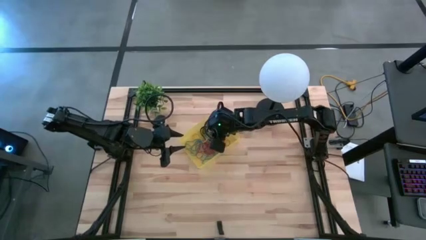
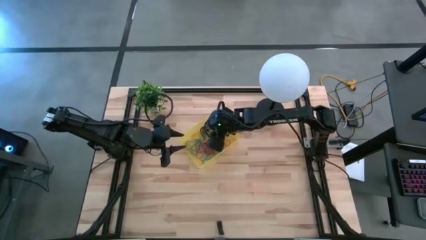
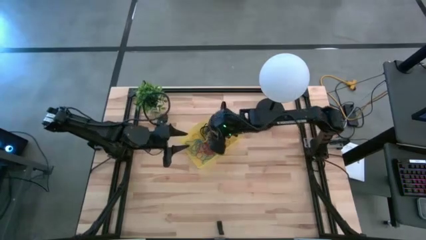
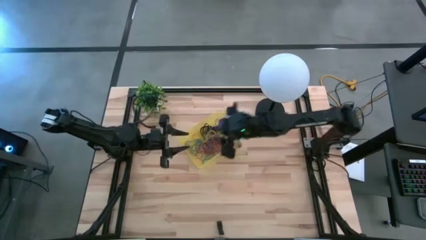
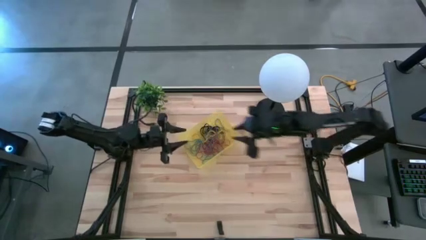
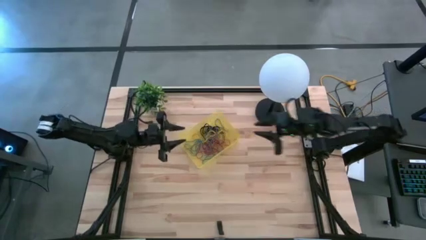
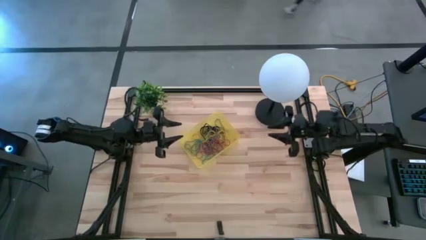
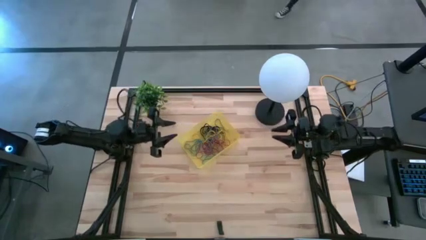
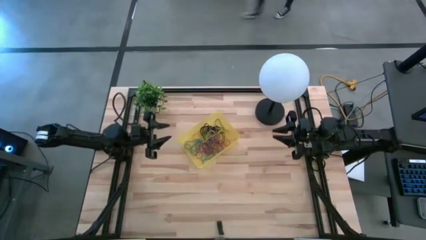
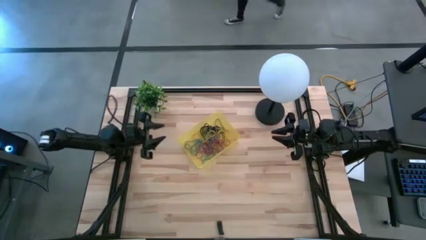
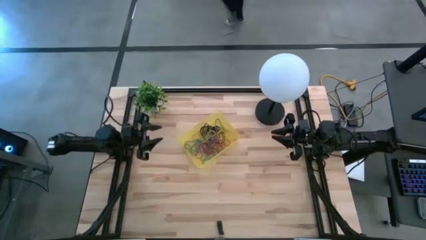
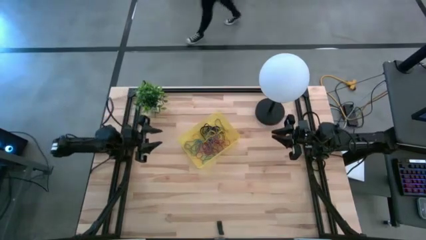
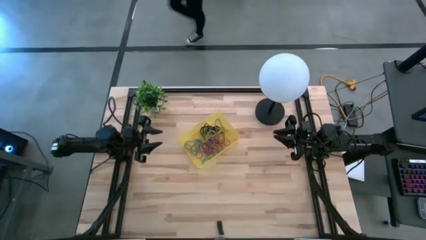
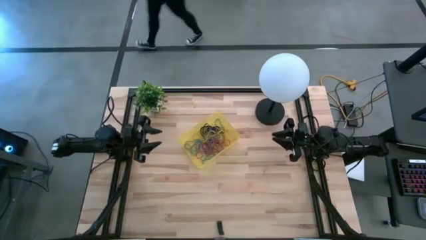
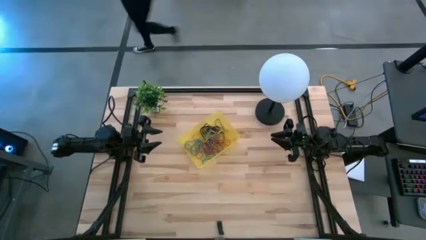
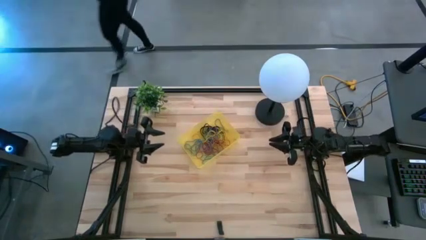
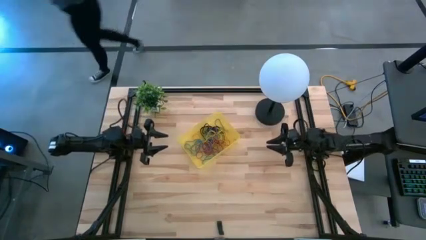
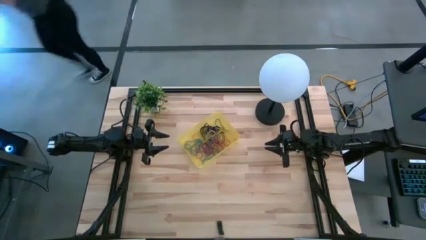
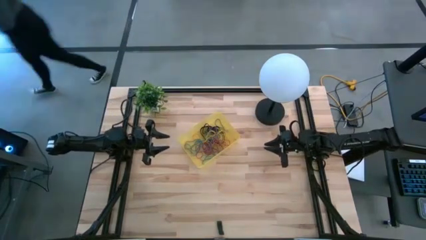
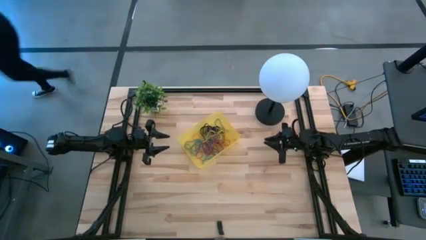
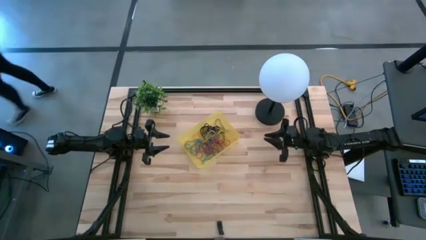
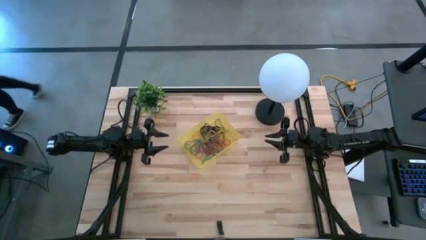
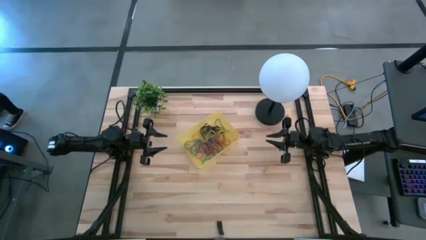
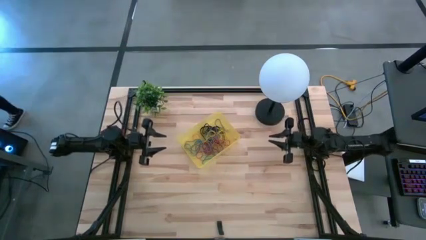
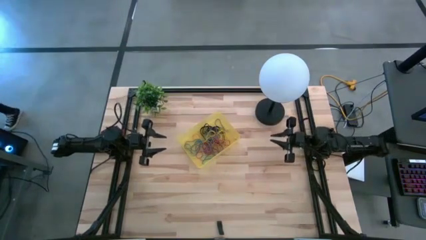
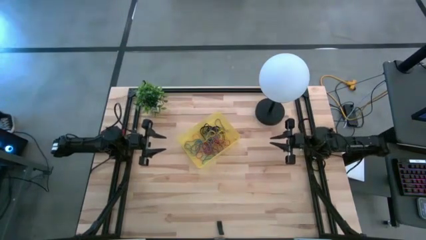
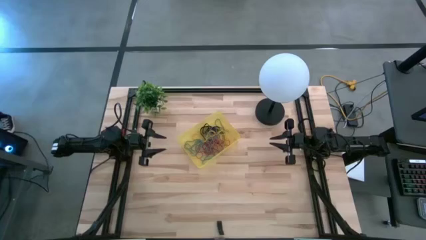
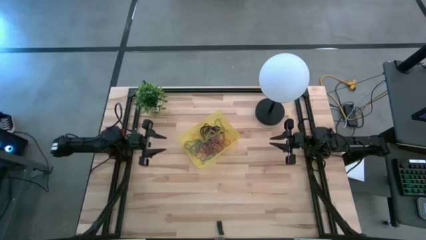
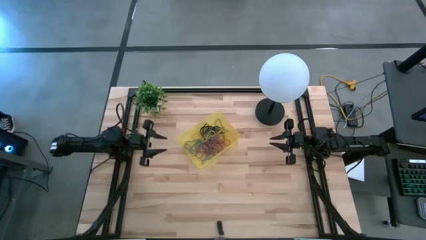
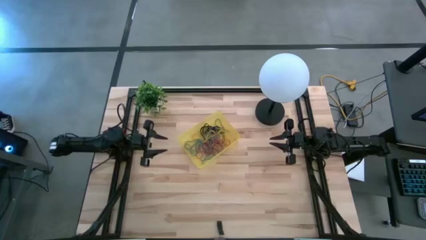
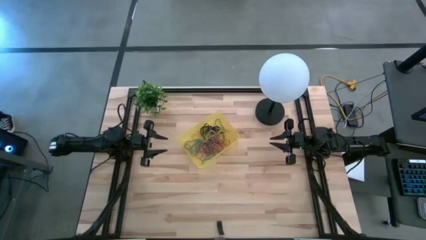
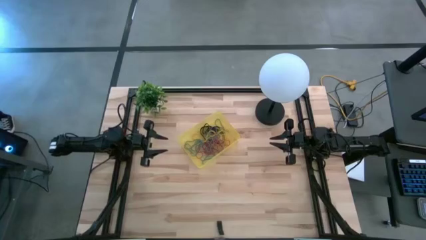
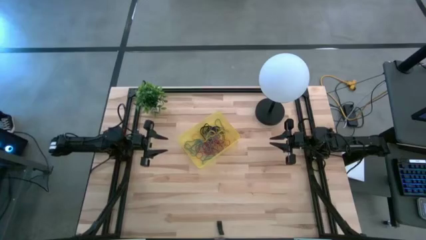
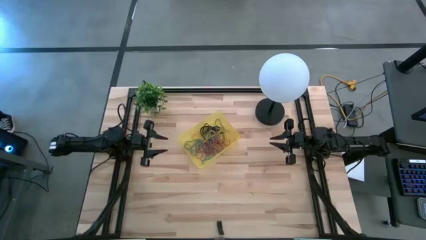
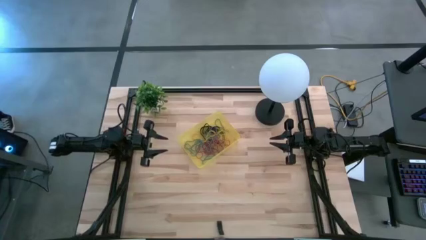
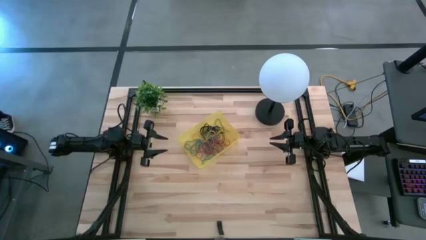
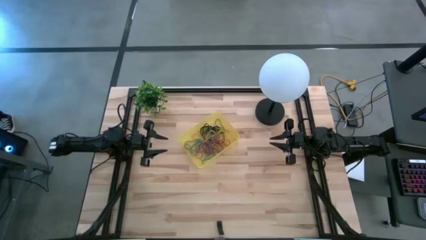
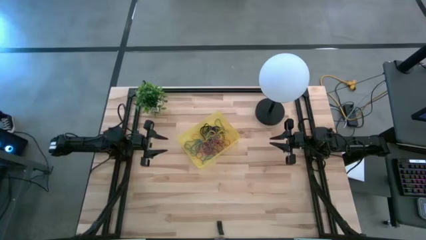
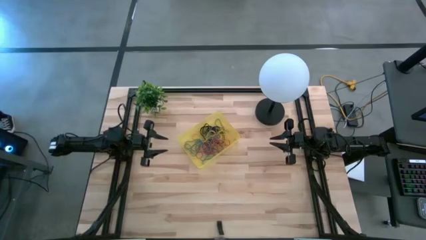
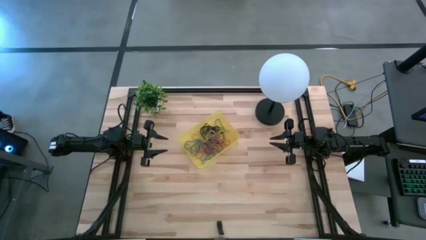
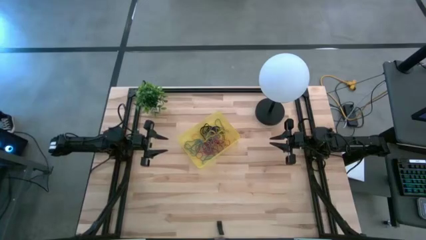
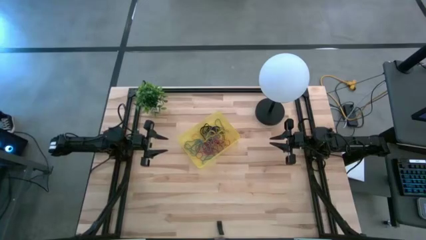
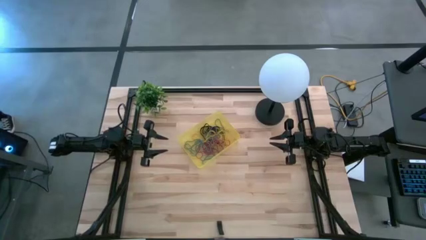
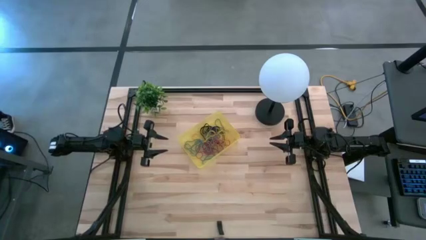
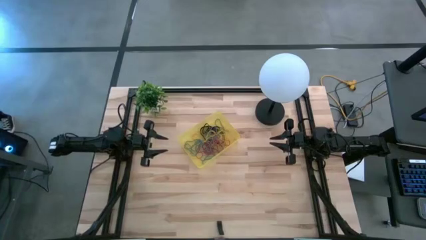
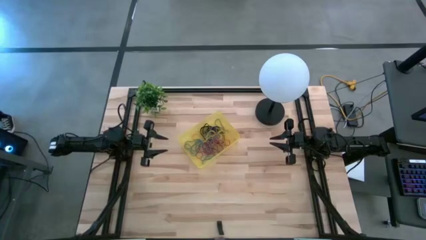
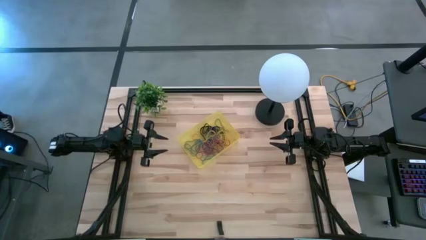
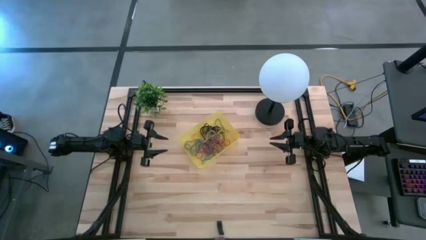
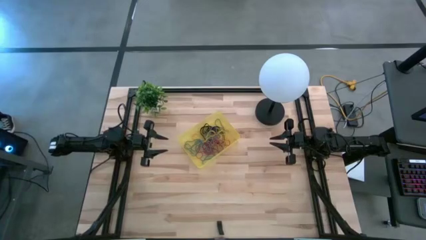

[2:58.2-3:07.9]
Task: Pick and place rubber bands into bin
Return to Home Position

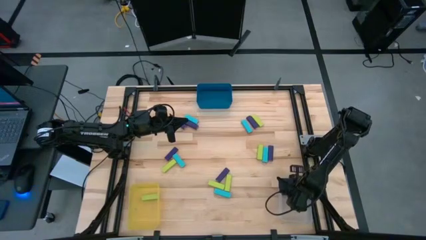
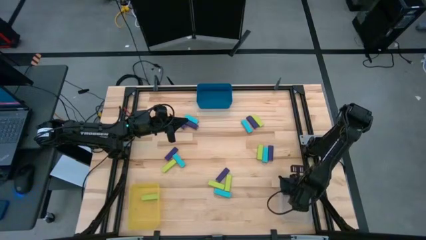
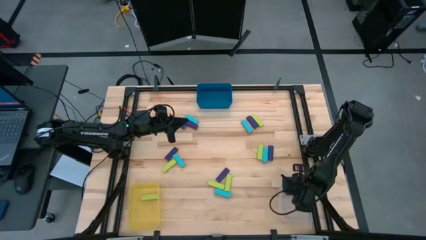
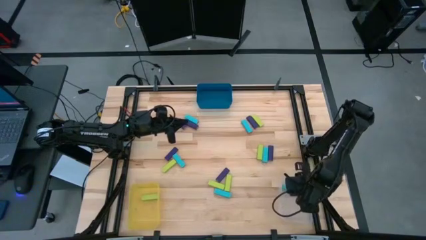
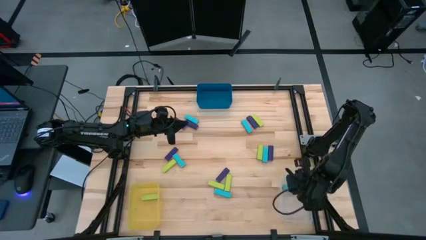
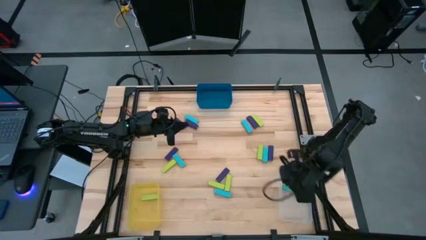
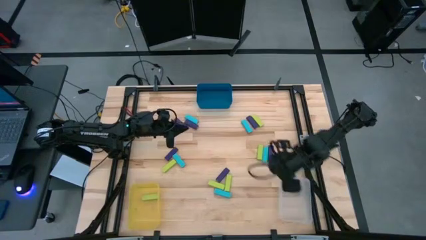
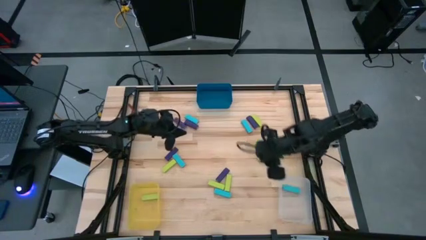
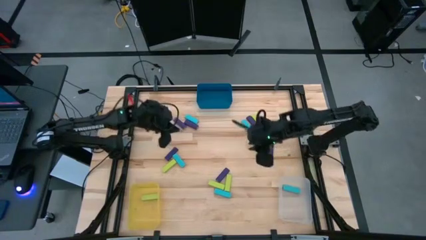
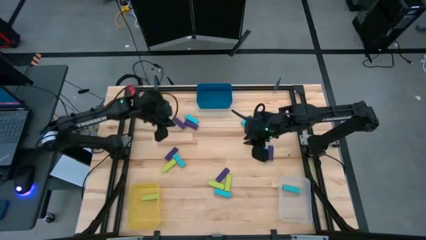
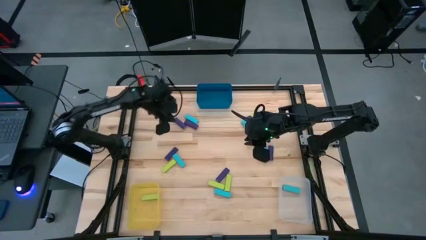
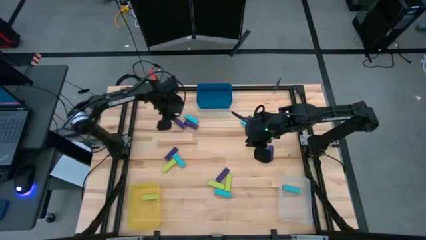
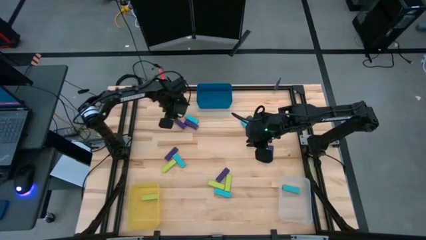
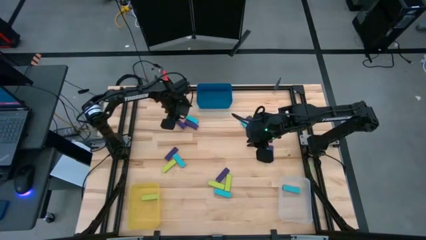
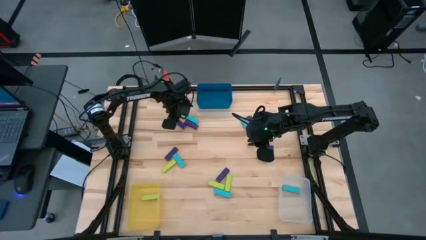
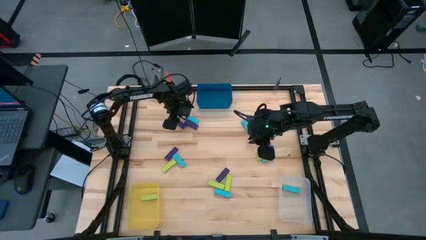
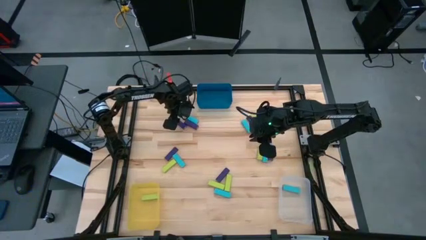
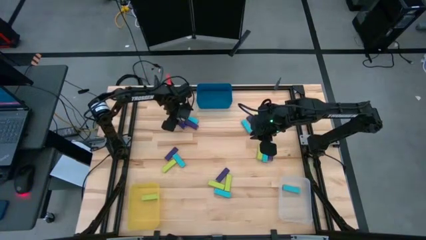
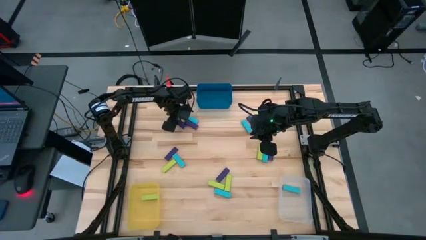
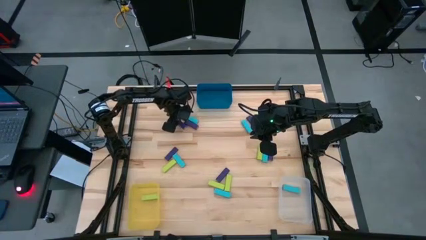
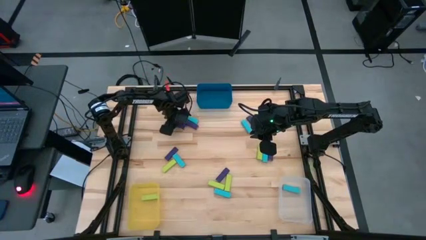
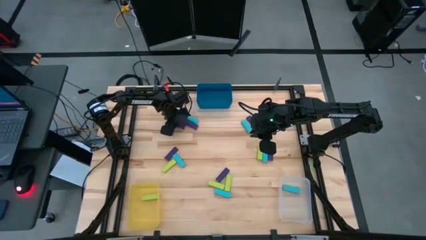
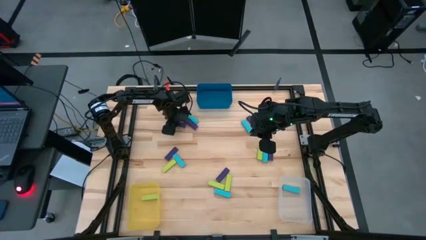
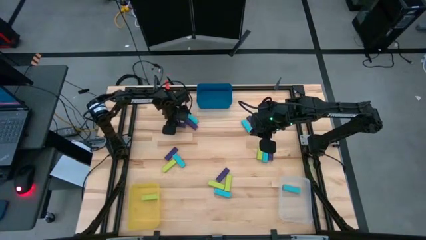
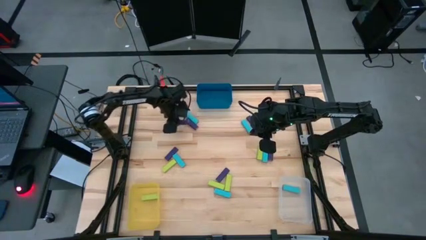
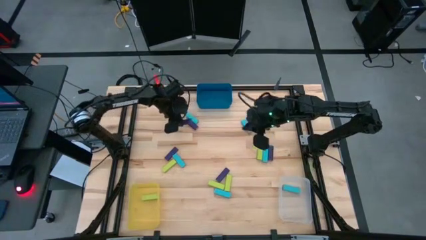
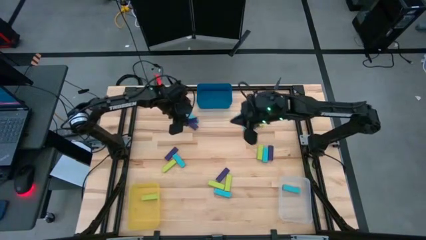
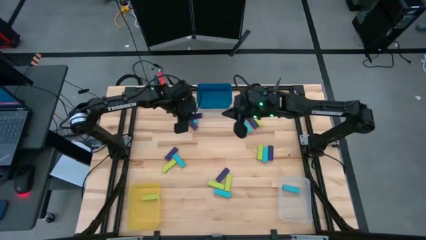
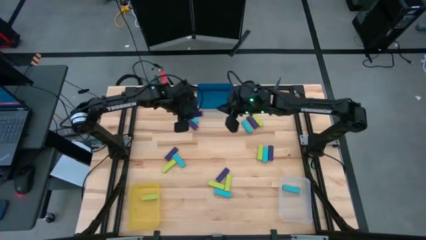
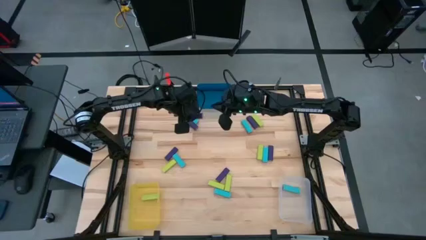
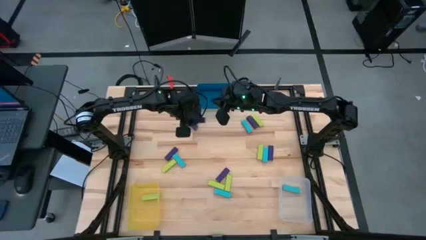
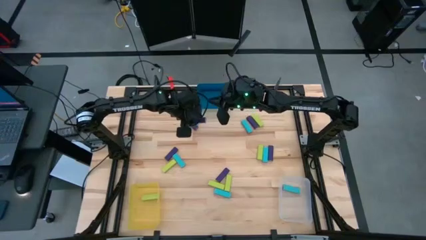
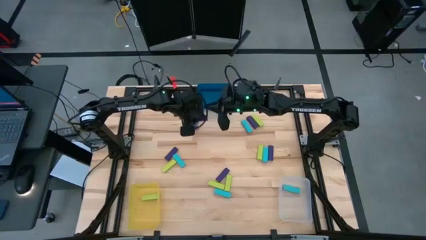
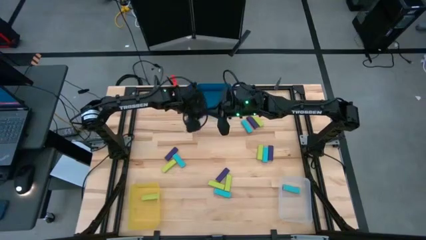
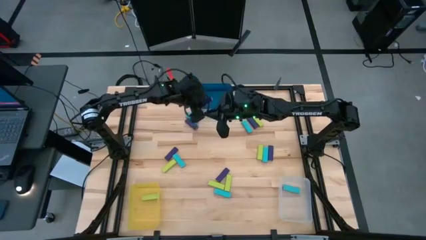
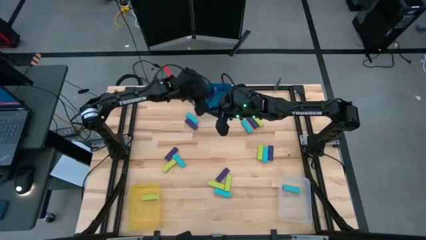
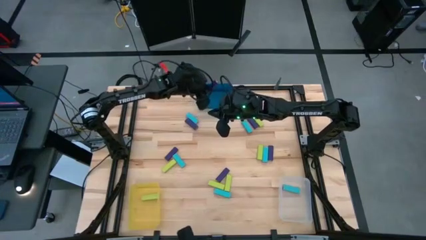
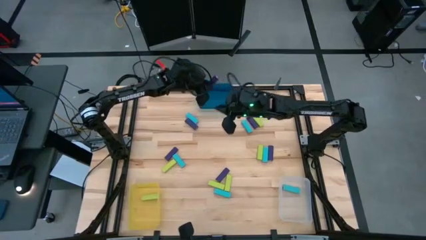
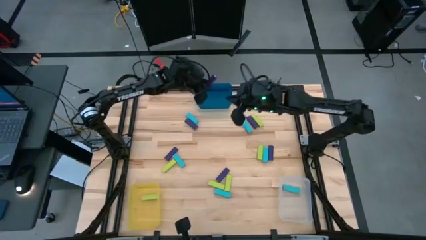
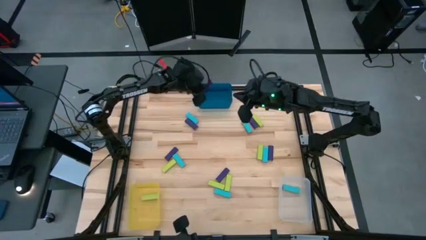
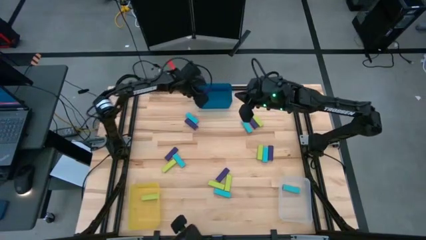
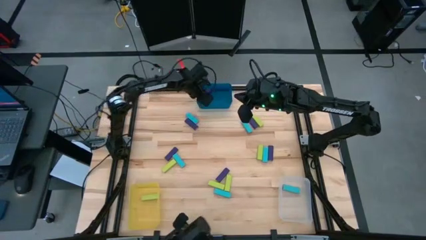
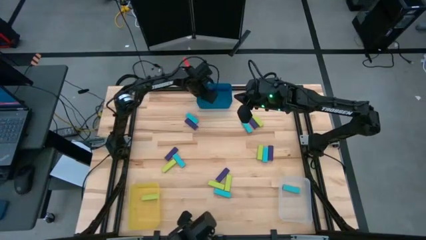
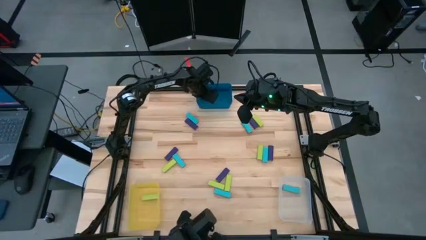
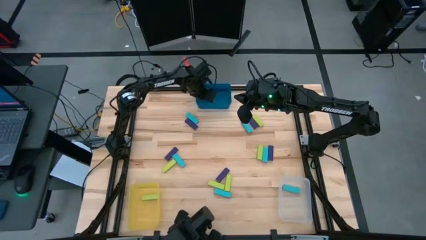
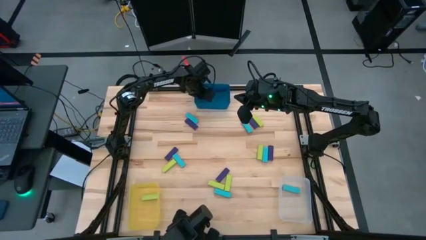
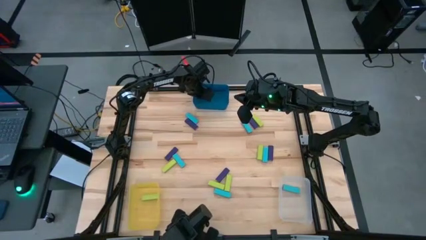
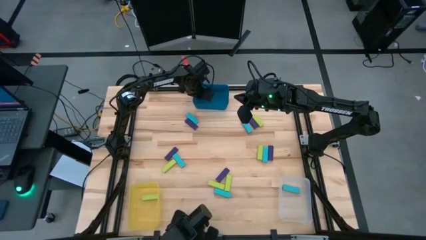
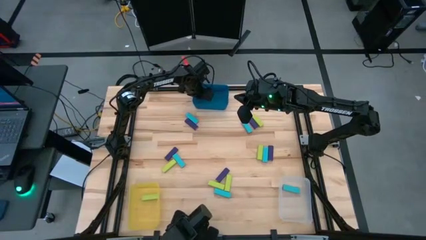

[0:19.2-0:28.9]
Task: Sort blocks
Put the purple block into the blue bin
